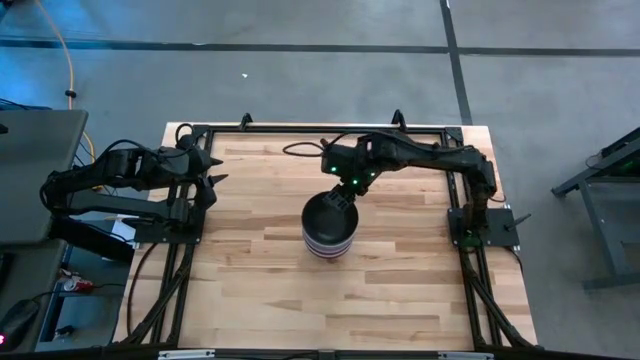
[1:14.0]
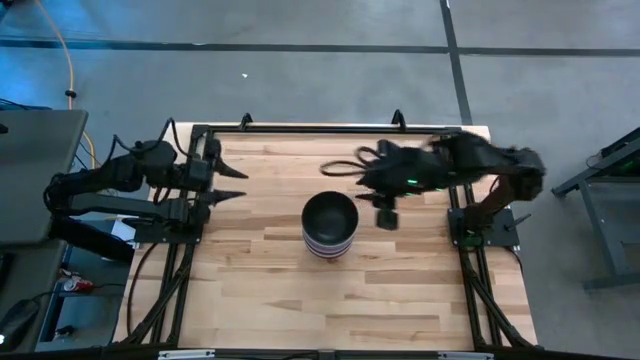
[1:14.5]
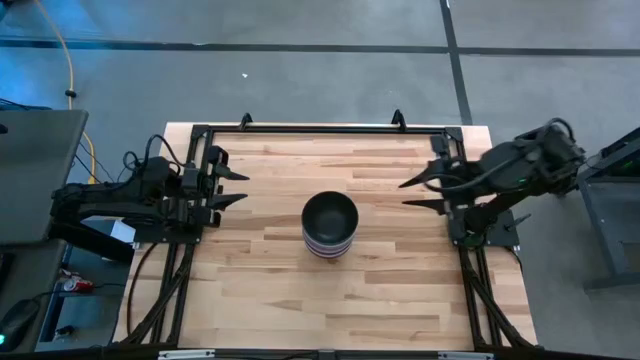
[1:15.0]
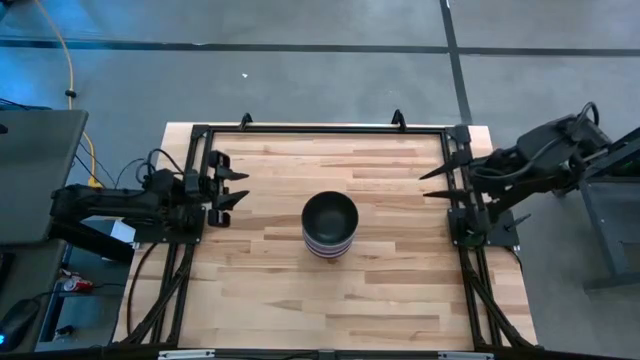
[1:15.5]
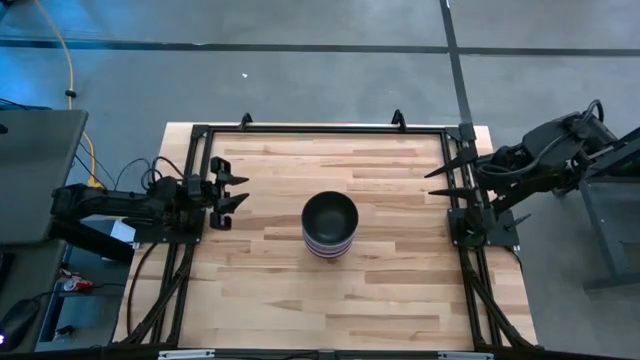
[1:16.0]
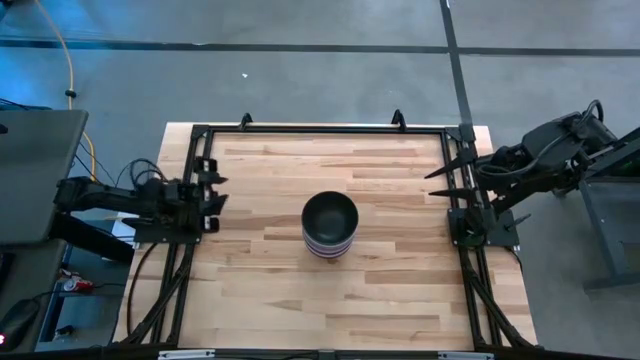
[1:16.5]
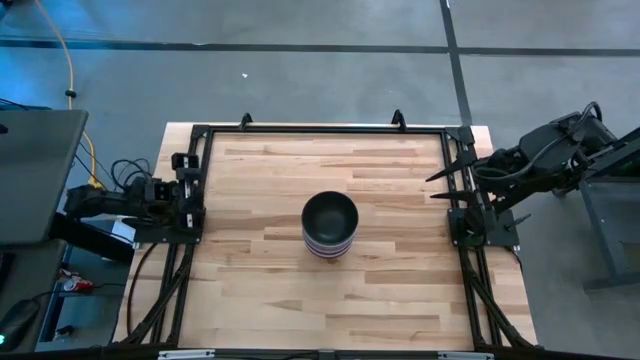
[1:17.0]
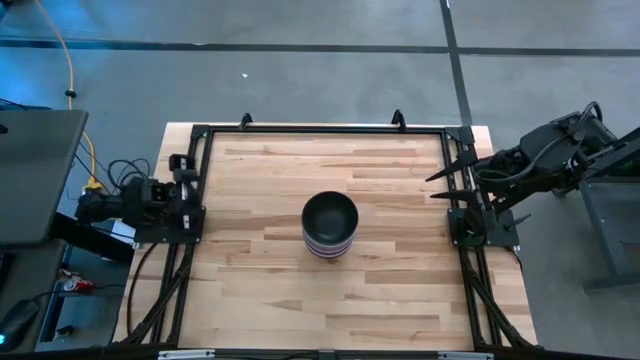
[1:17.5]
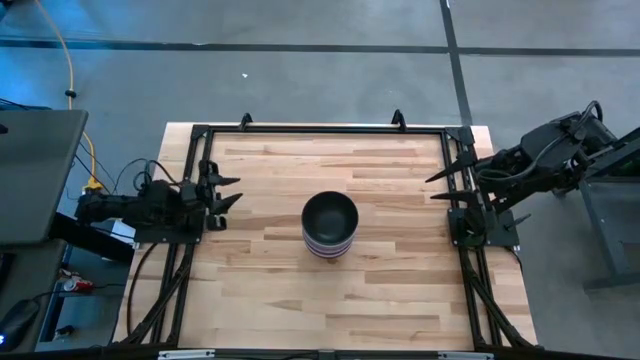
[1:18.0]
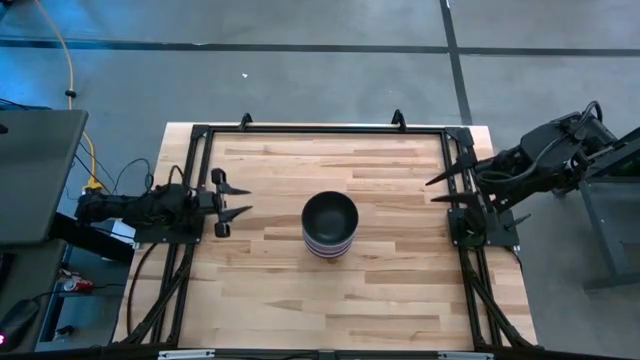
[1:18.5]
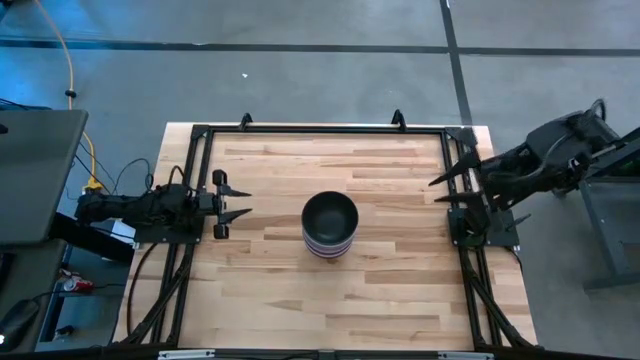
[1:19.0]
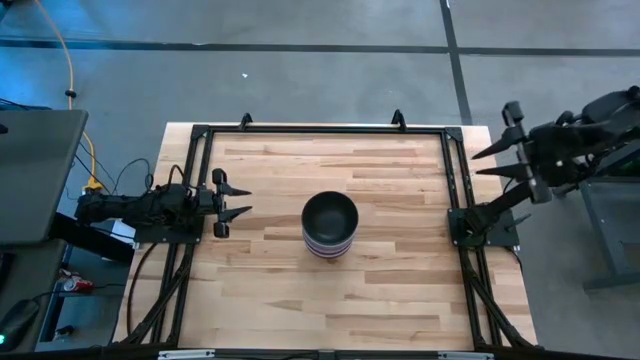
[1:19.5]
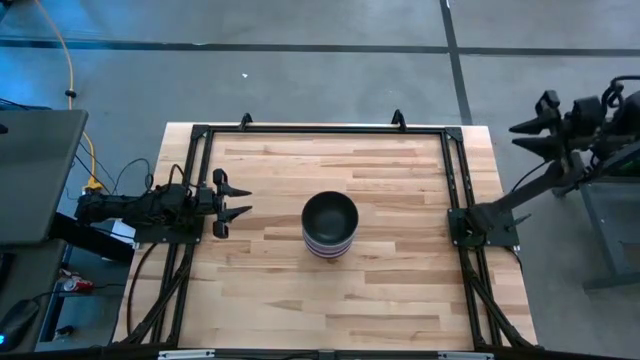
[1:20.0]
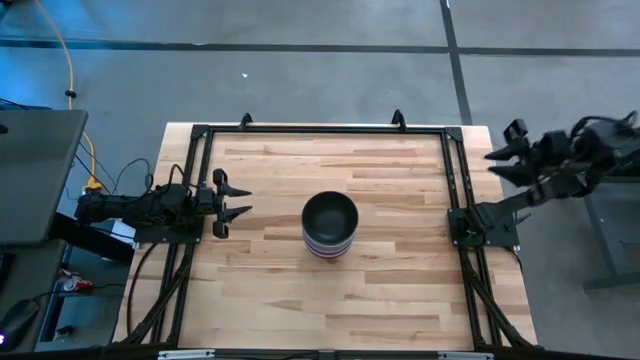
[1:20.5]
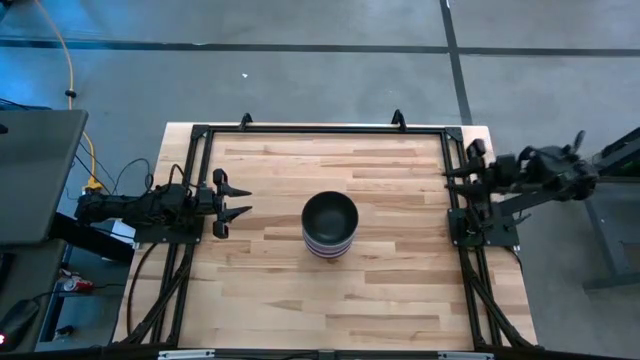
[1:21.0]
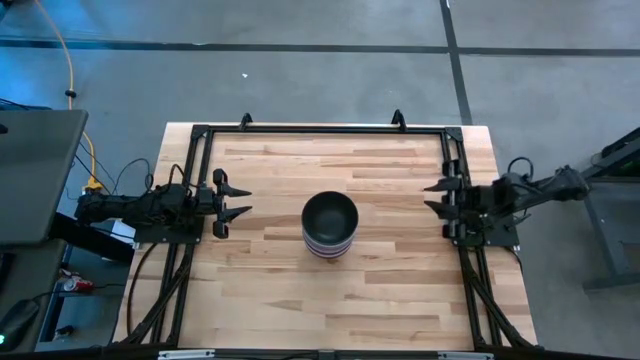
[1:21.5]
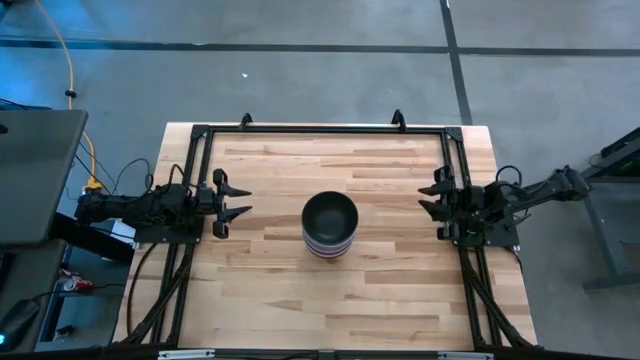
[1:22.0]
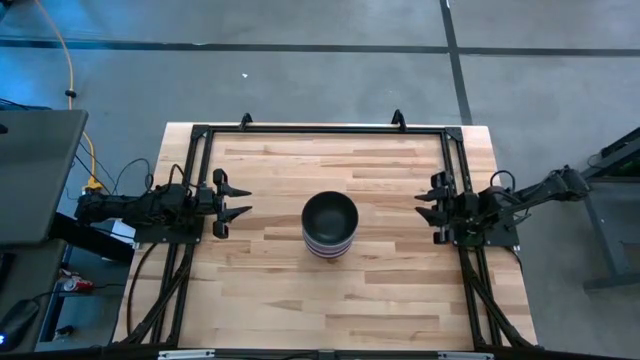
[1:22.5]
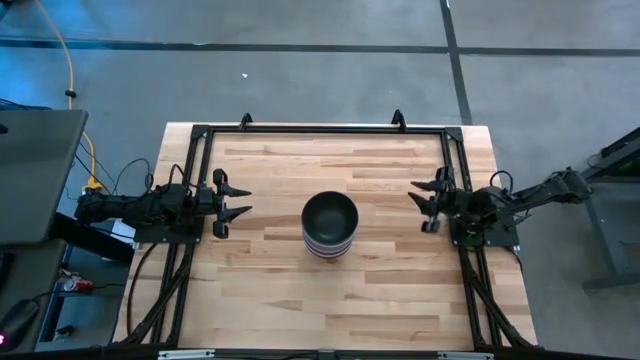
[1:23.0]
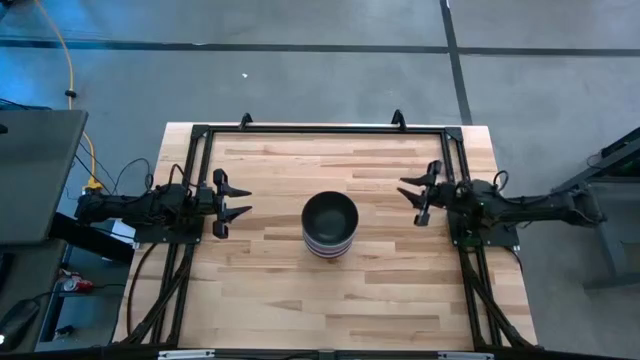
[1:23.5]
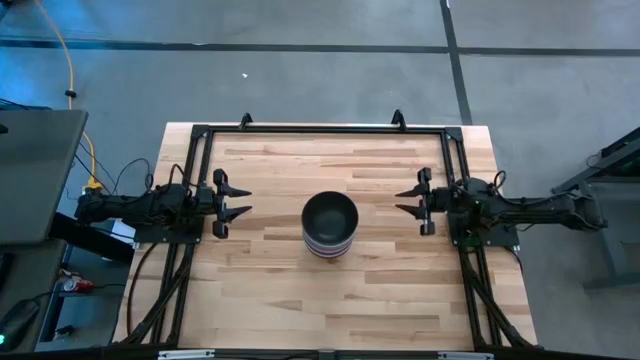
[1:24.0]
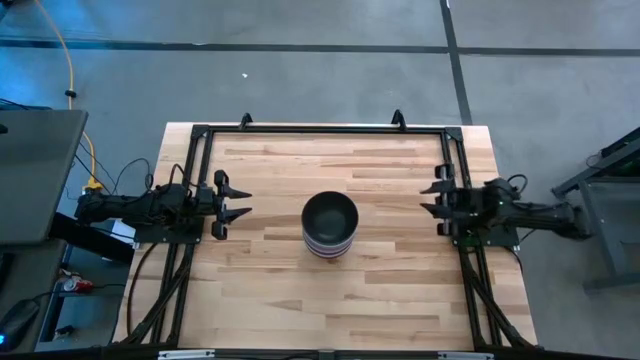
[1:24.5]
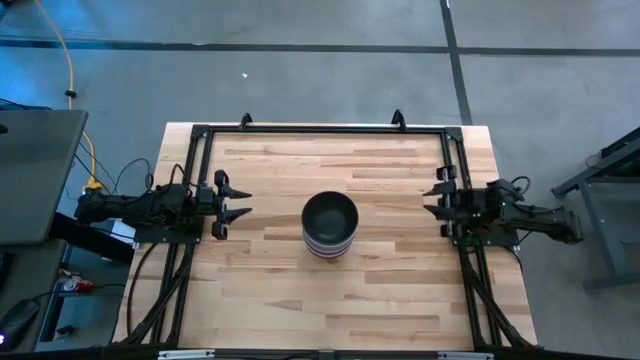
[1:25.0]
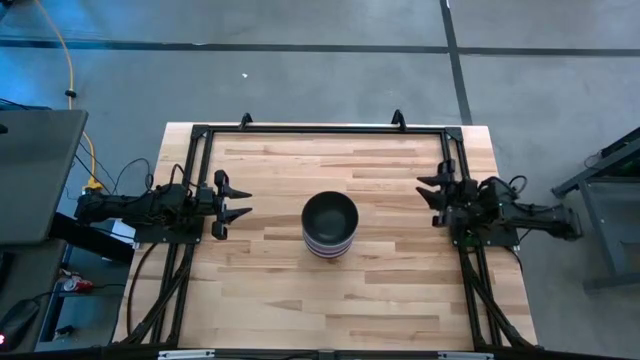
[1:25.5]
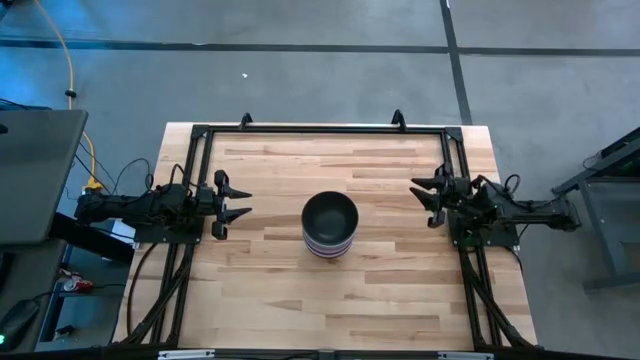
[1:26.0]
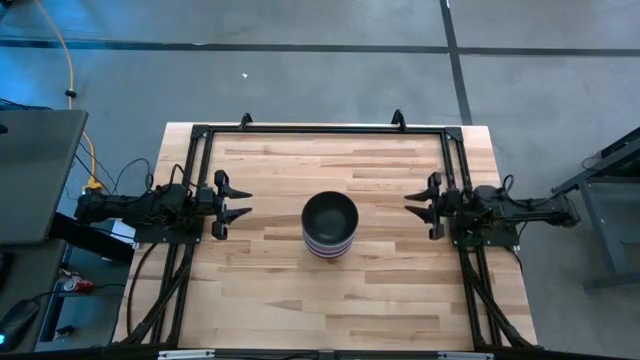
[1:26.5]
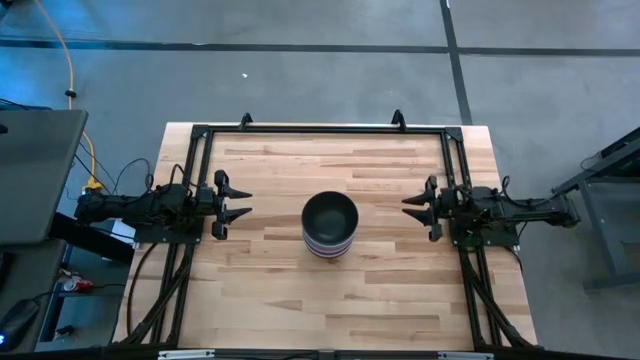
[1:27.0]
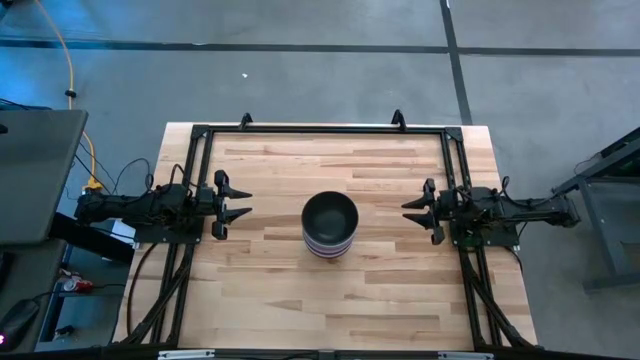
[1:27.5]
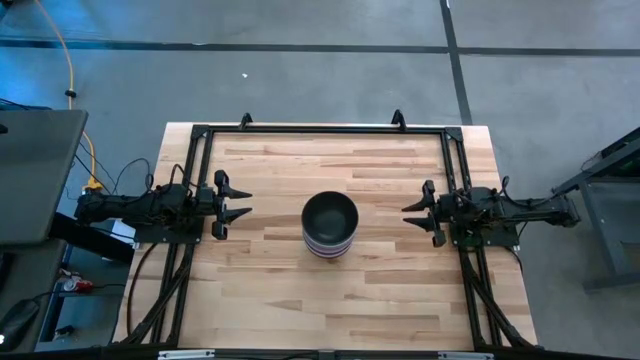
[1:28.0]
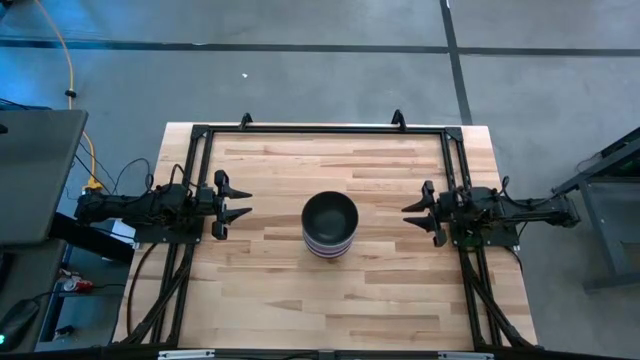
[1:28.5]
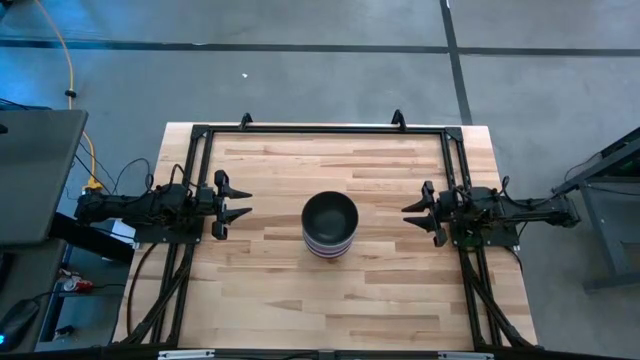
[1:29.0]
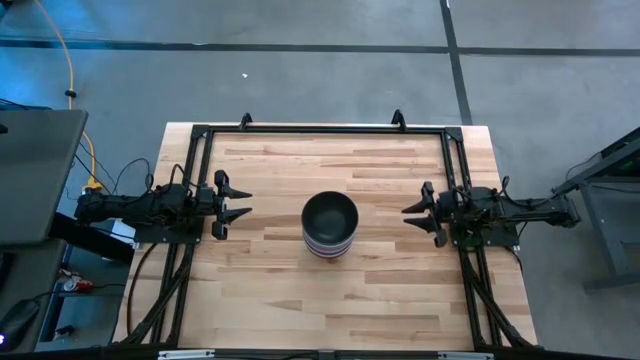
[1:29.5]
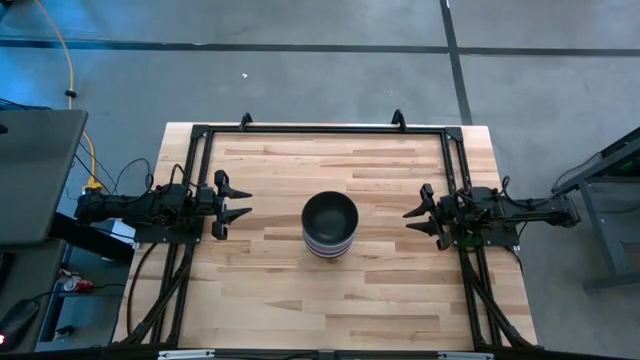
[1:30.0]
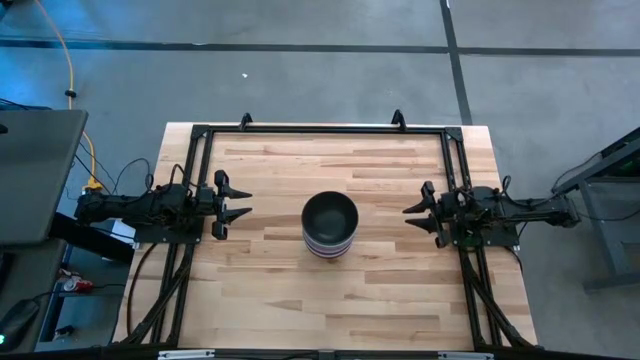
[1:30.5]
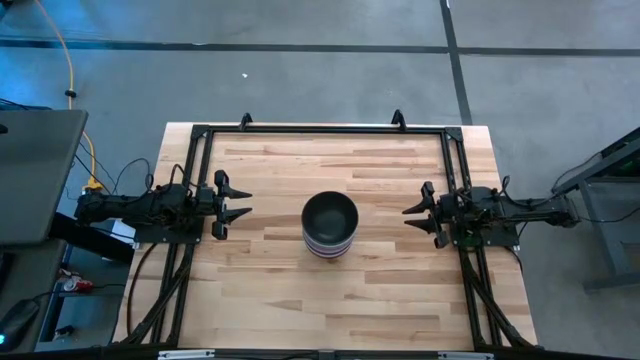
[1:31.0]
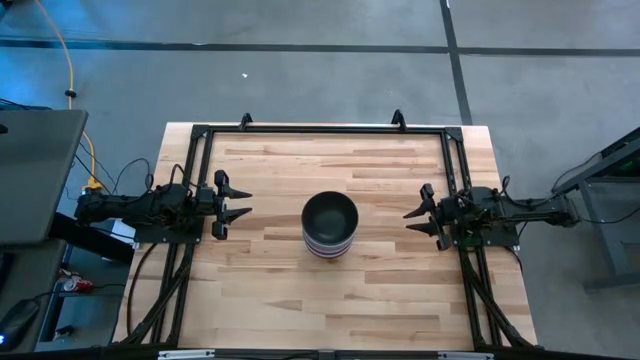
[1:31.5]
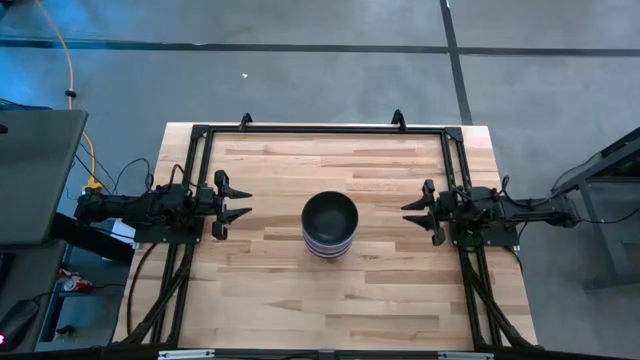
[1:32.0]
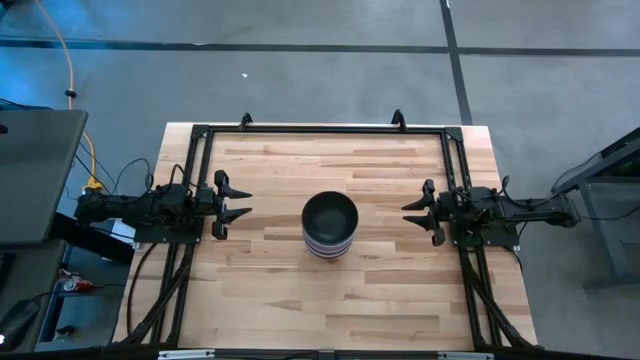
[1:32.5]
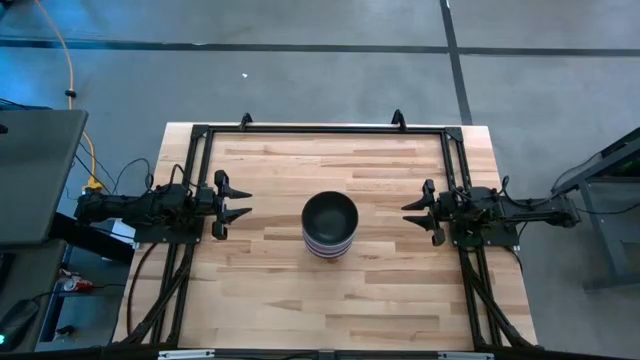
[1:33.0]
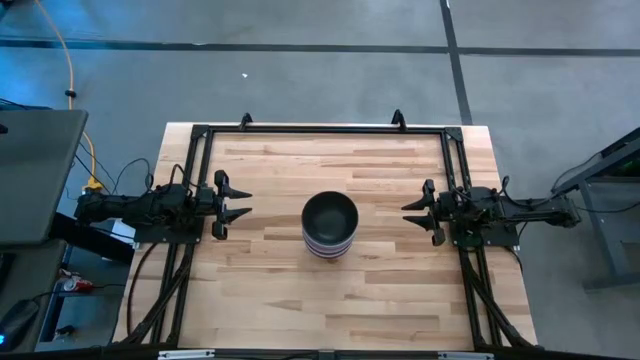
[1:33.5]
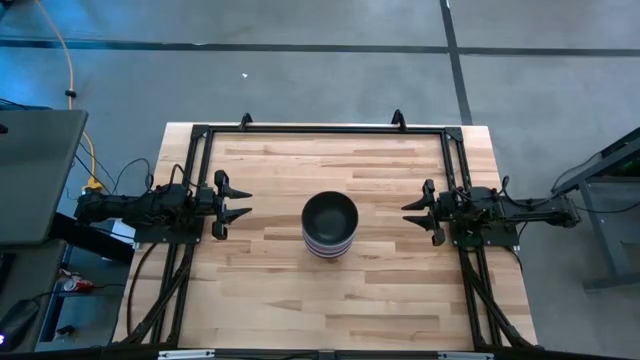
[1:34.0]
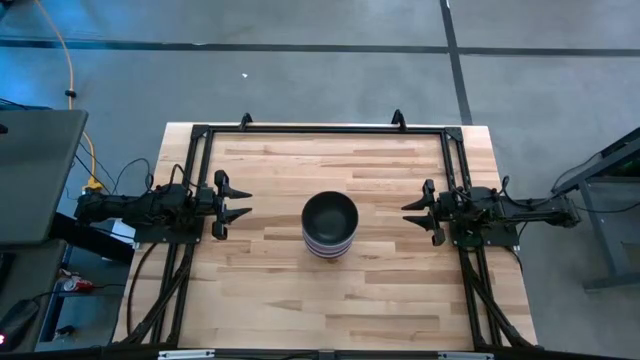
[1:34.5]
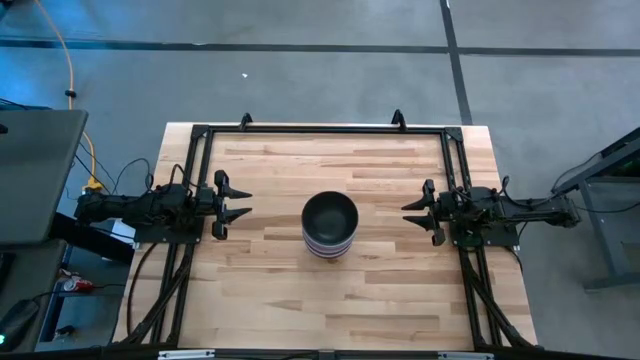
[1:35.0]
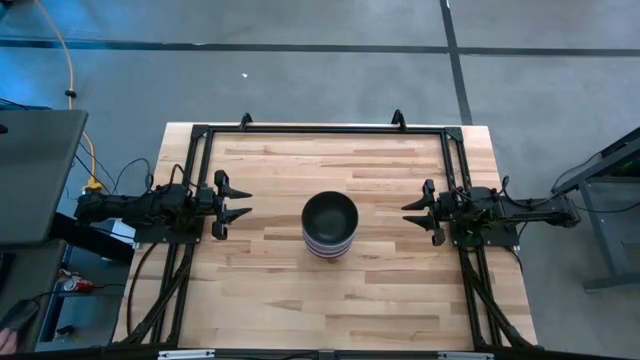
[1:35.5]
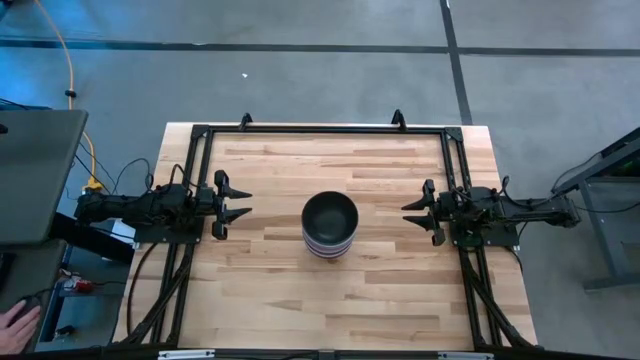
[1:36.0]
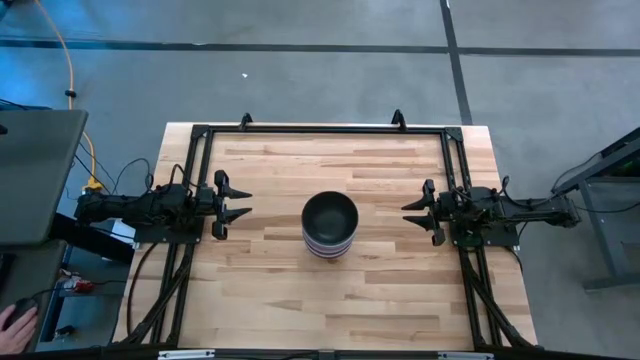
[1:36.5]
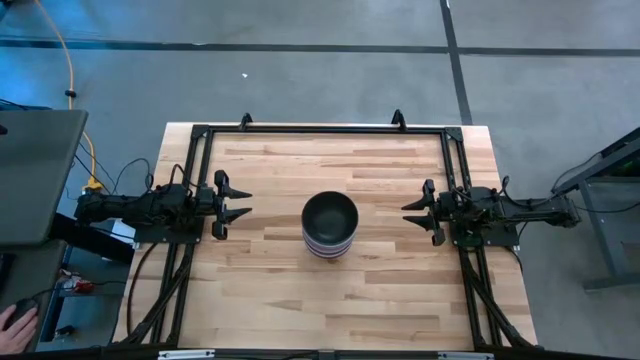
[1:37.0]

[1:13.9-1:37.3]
Task: Nest bowls inside each other
Return to Home Position
